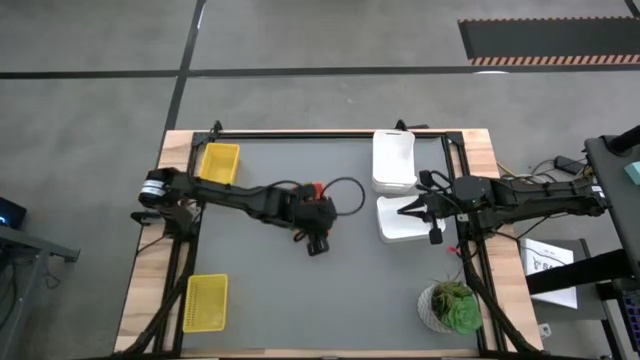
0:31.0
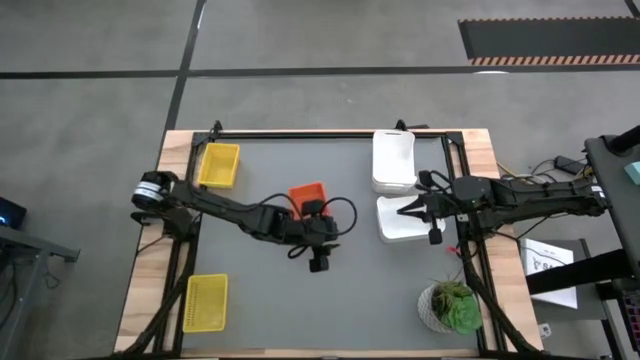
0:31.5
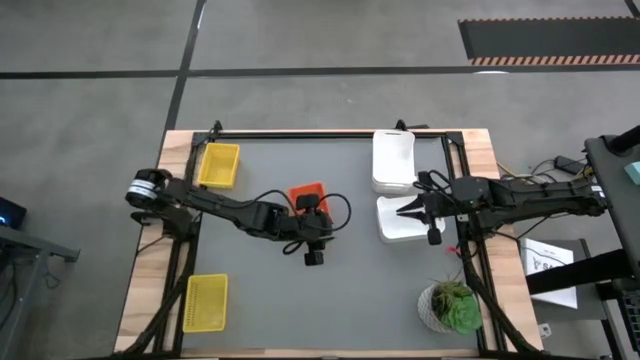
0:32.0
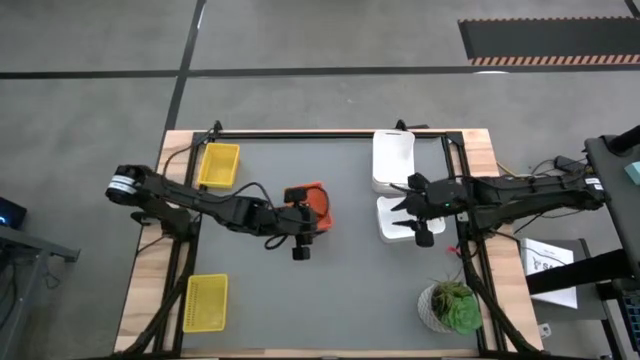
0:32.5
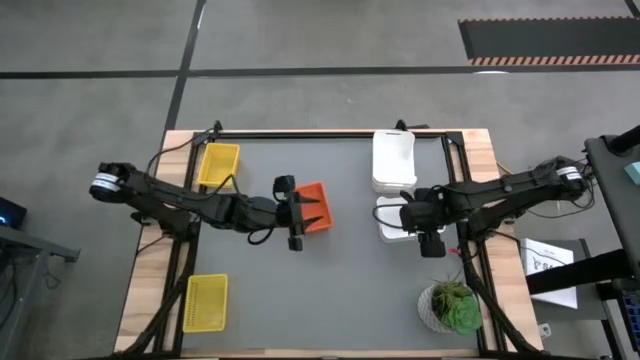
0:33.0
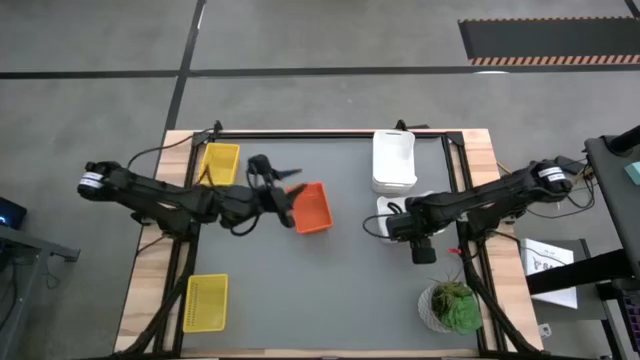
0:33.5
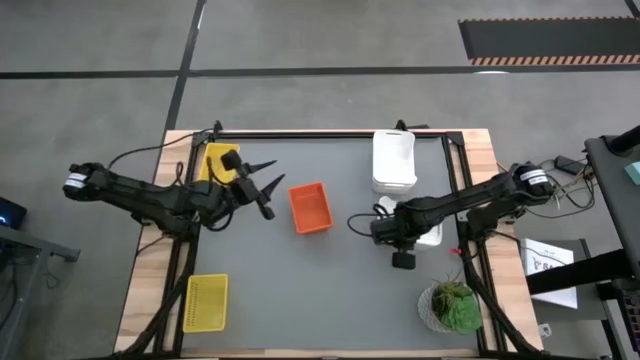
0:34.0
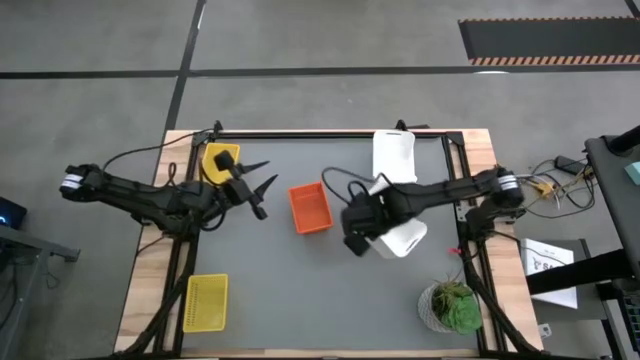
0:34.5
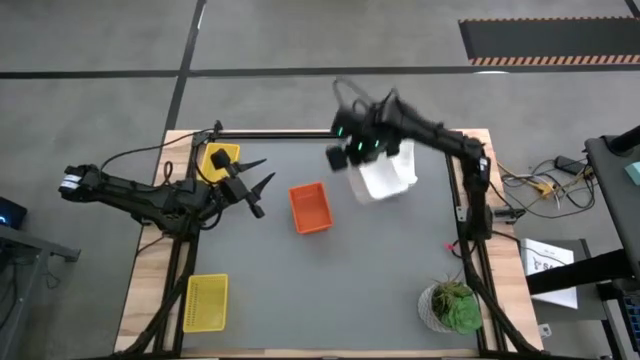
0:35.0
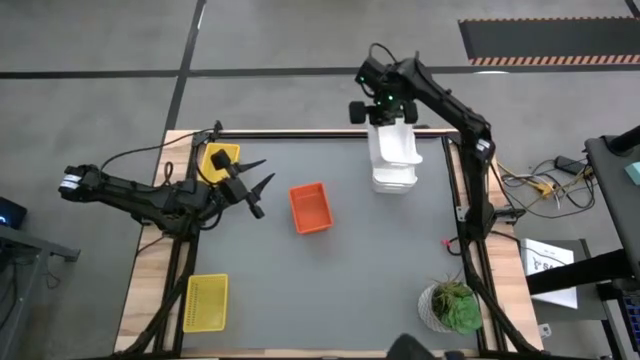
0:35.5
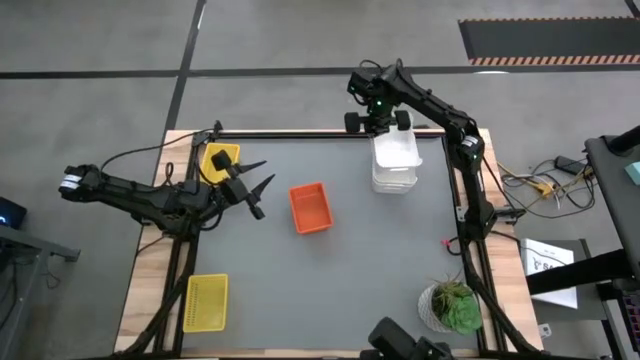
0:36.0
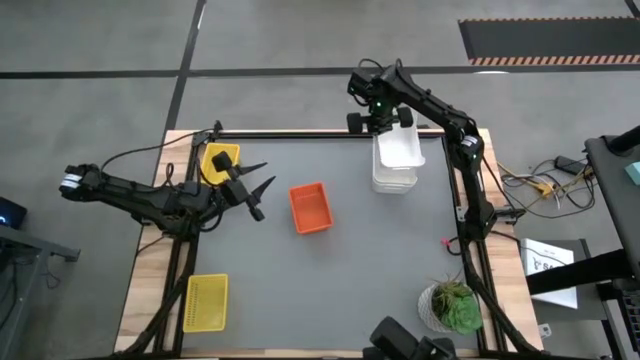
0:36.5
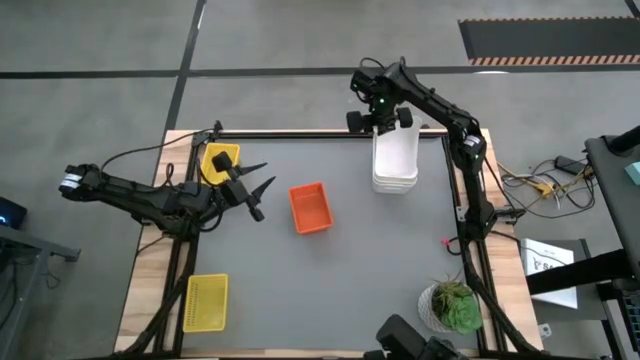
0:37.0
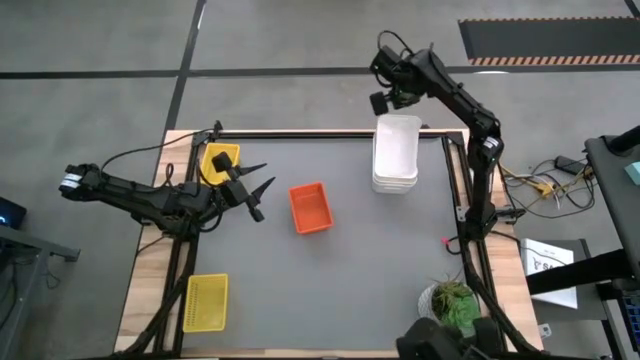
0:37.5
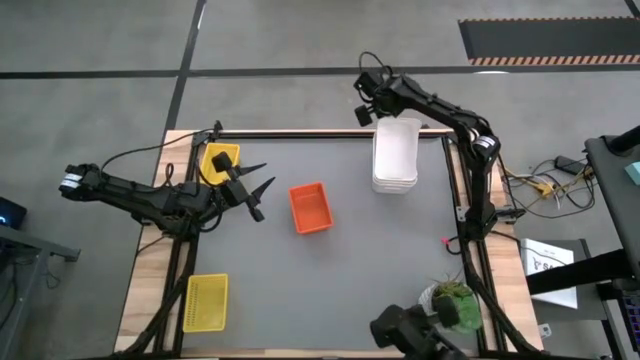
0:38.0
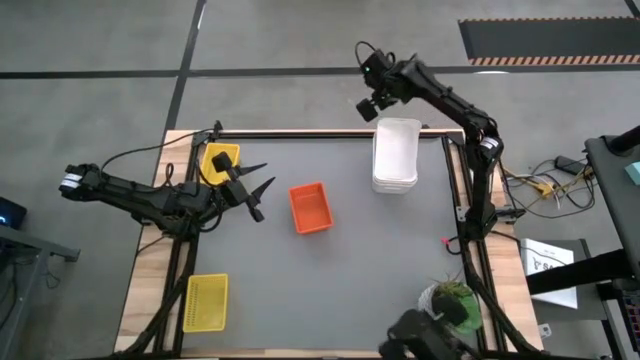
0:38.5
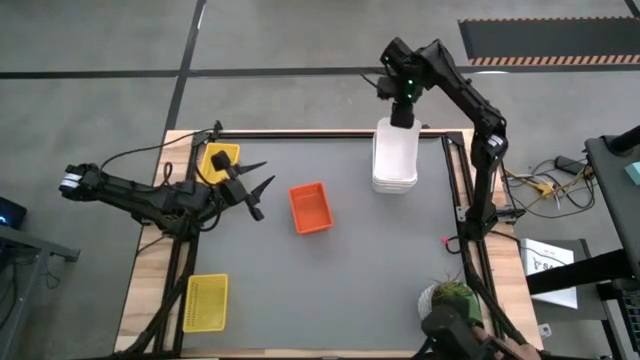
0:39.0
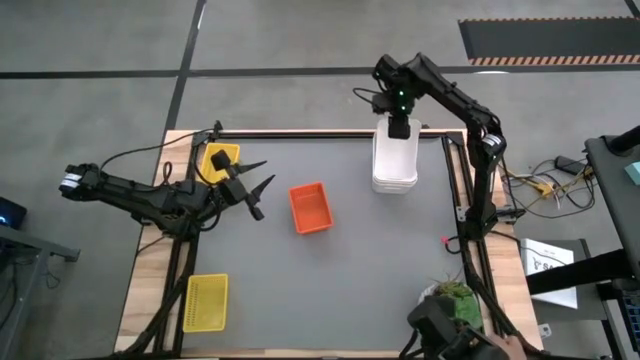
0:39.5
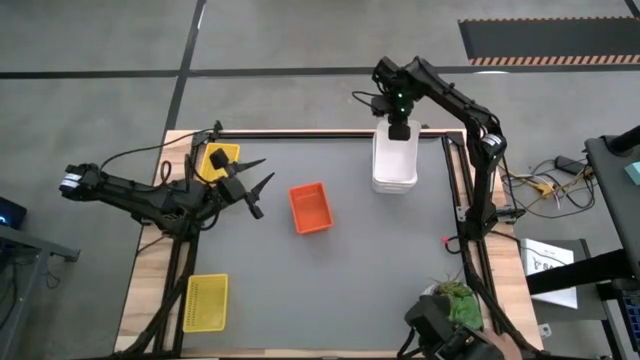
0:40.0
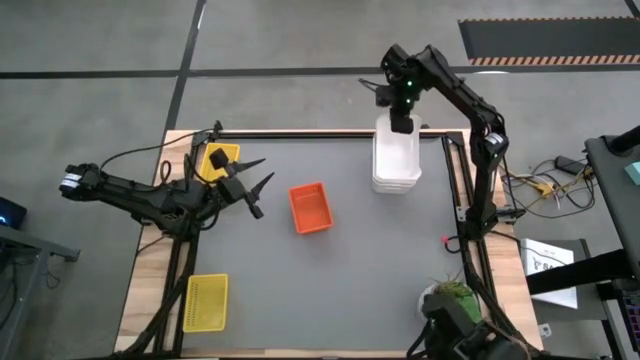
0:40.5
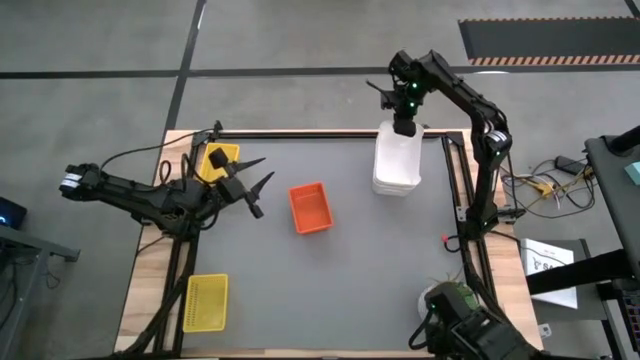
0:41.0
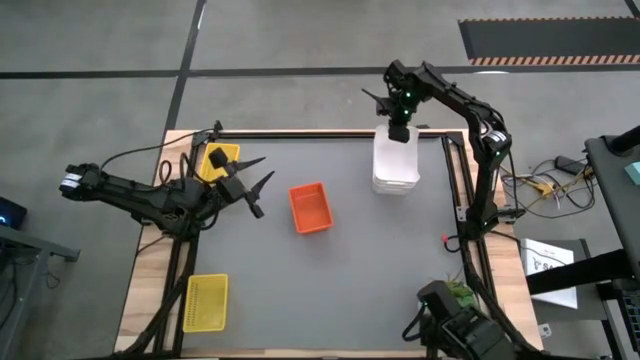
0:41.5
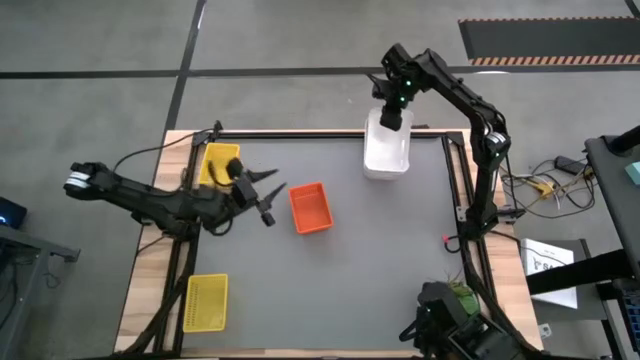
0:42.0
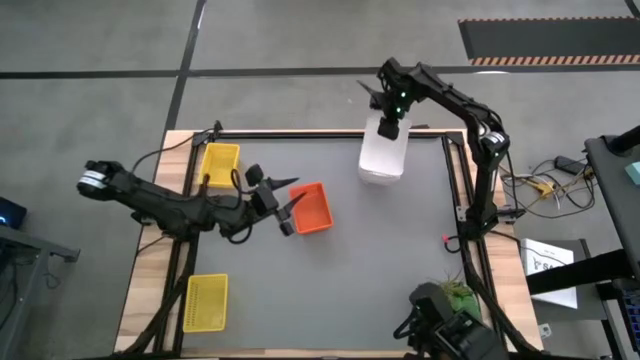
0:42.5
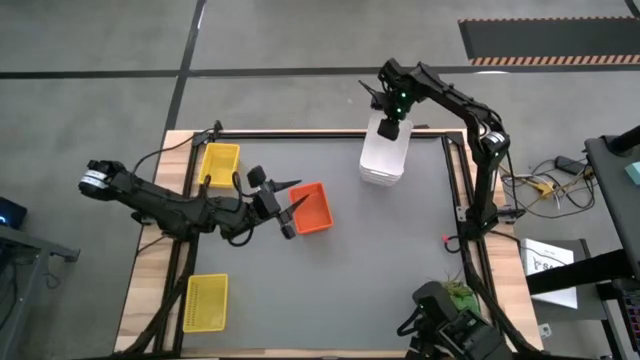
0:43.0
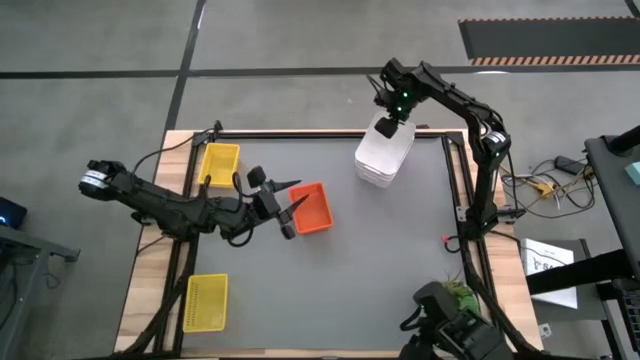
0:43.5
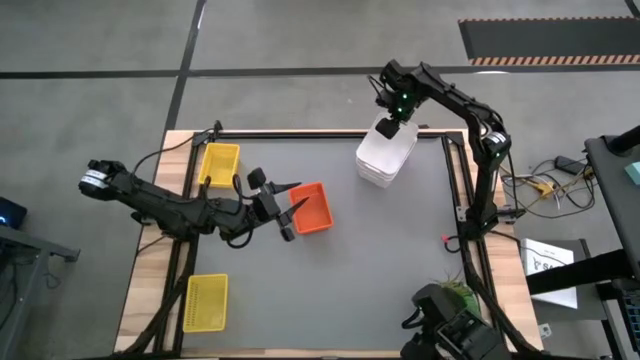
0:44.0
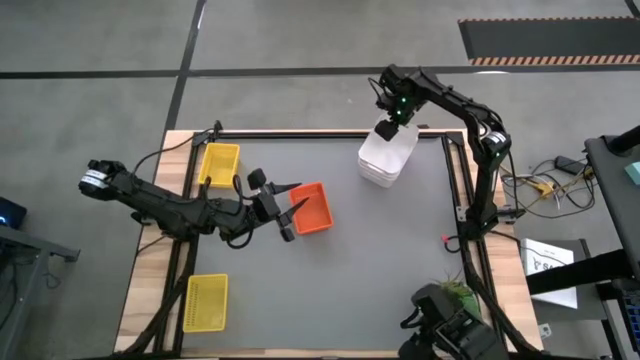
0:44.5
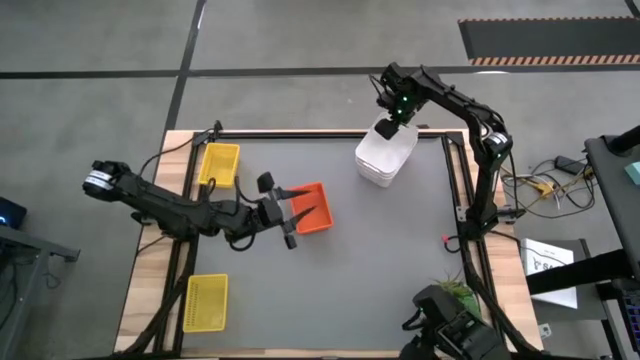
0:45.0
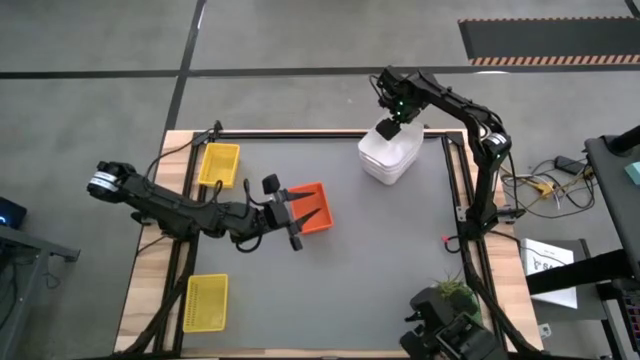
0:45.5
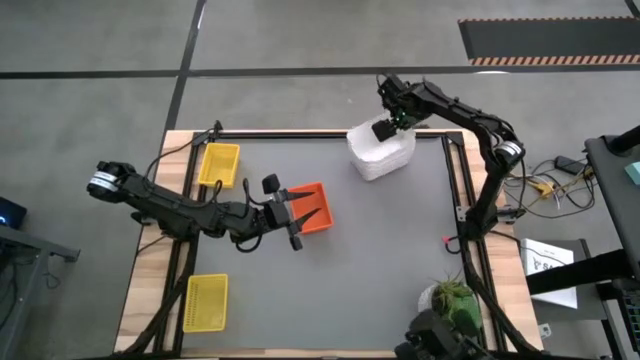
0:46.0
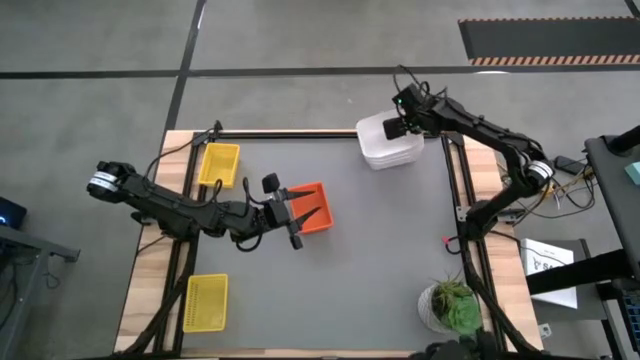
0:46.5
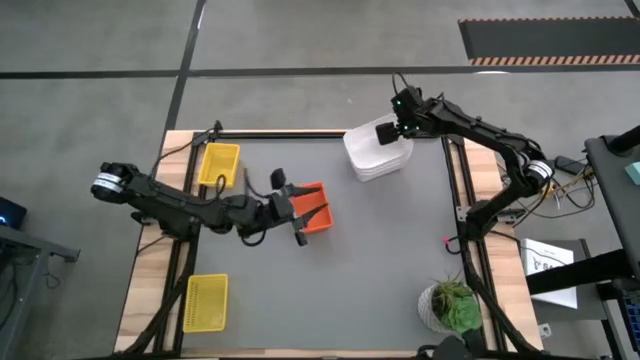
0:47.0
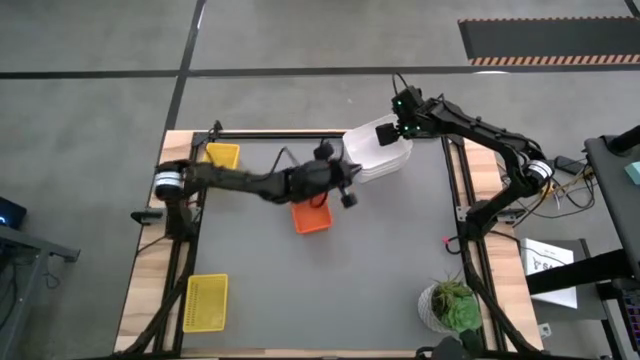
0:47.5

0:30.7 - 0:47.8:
Stack the bottom white bin on top of the top white bin

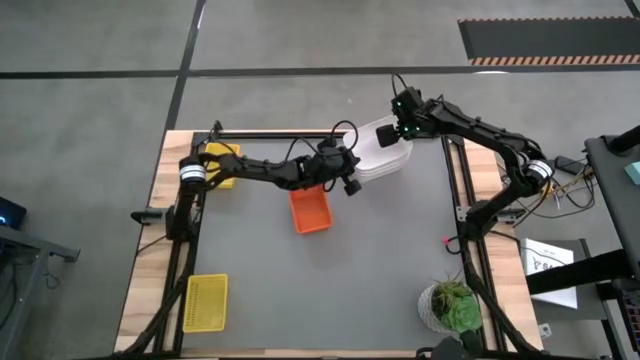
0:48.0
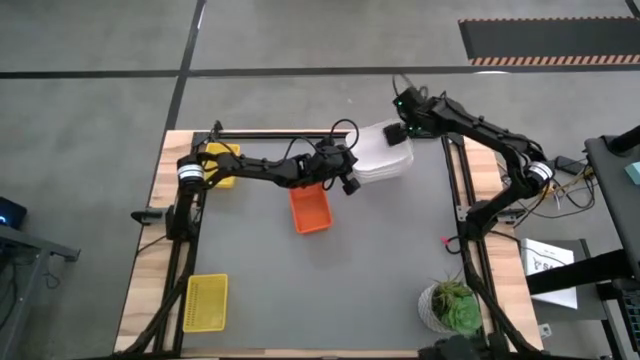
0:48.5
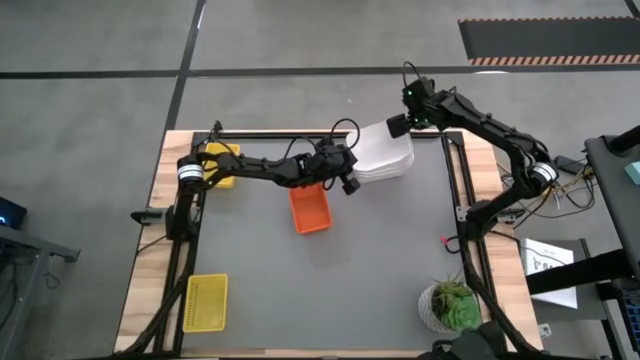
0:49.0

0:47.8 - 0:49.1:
Stack the bottom white bin on top of the top white bin
